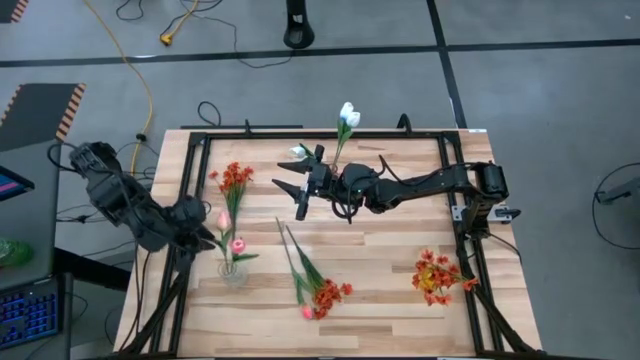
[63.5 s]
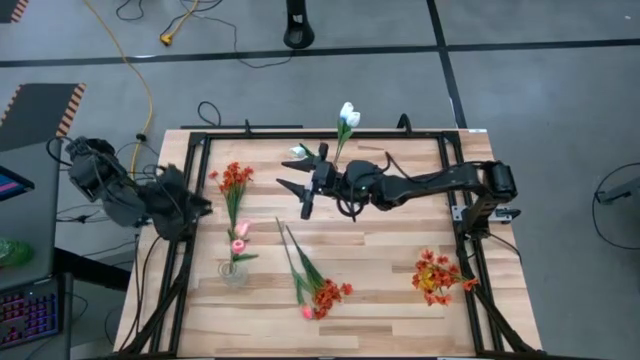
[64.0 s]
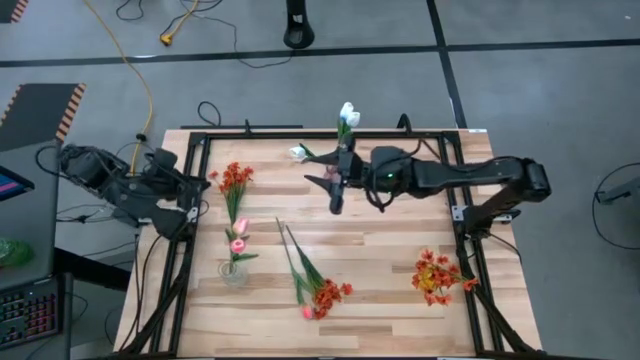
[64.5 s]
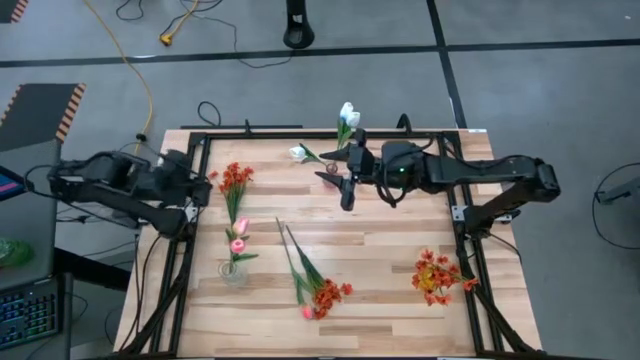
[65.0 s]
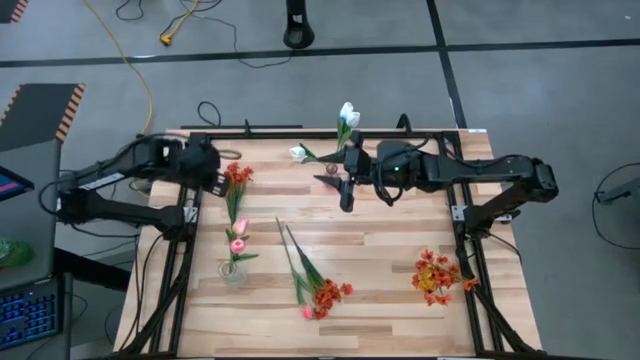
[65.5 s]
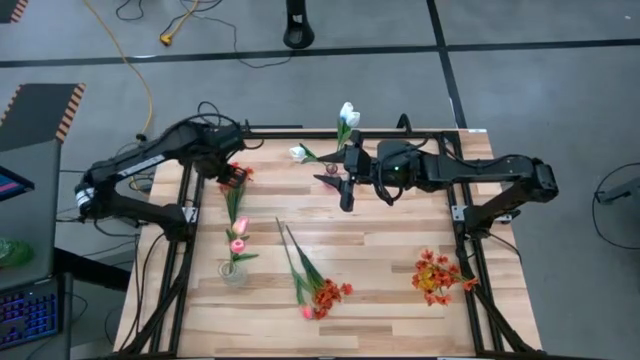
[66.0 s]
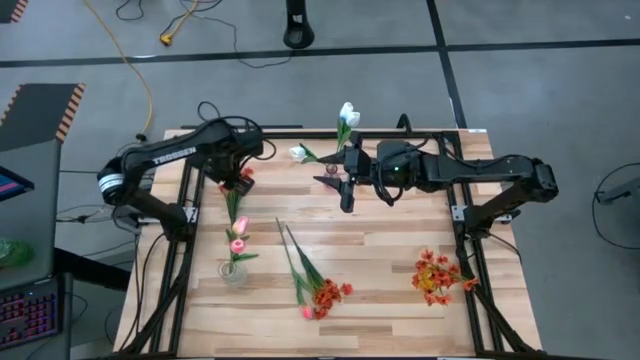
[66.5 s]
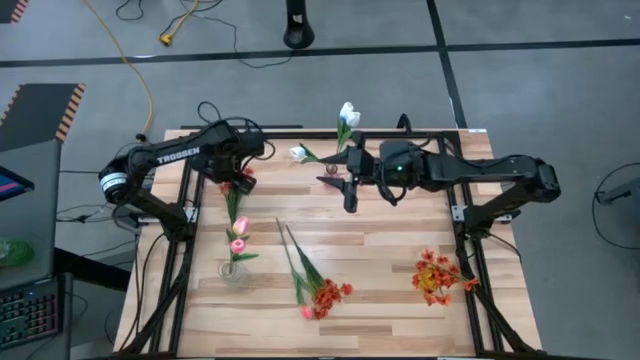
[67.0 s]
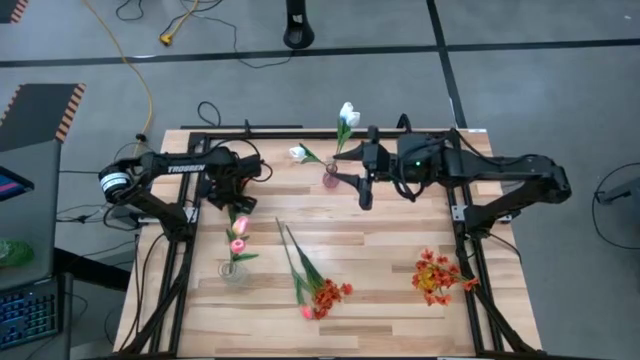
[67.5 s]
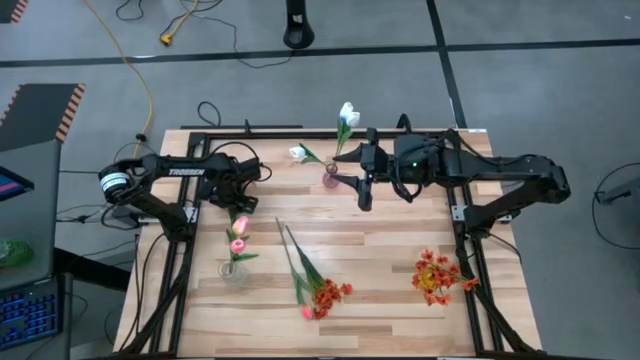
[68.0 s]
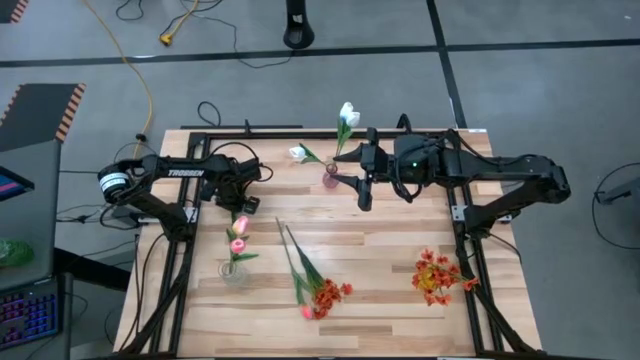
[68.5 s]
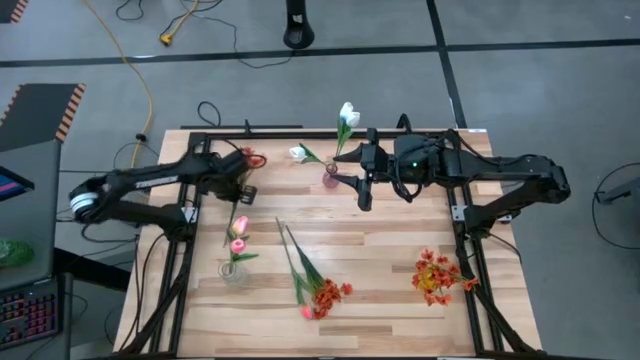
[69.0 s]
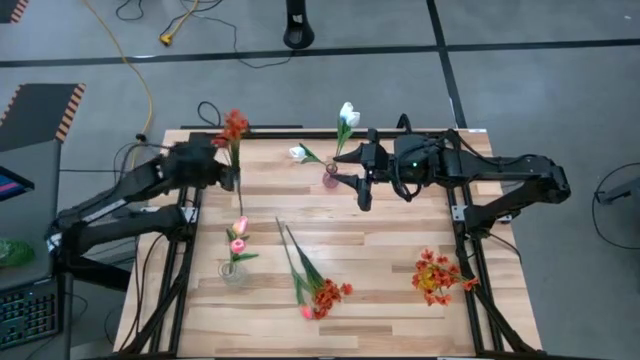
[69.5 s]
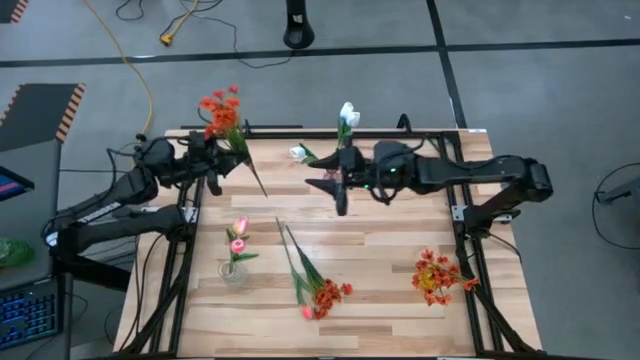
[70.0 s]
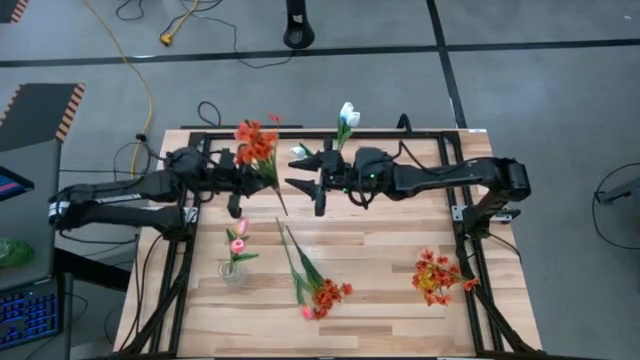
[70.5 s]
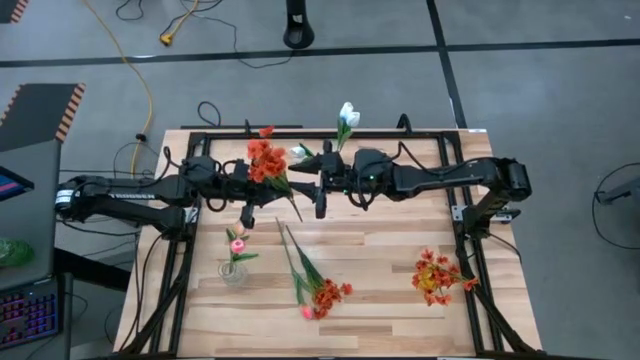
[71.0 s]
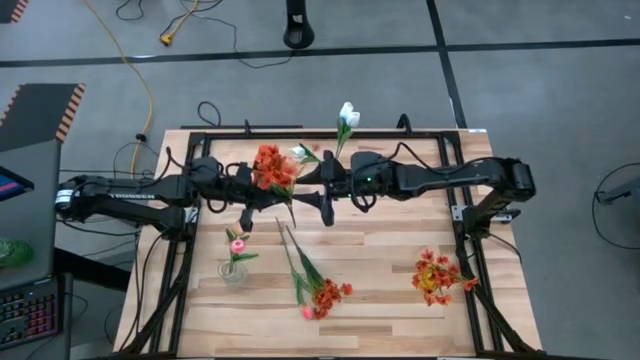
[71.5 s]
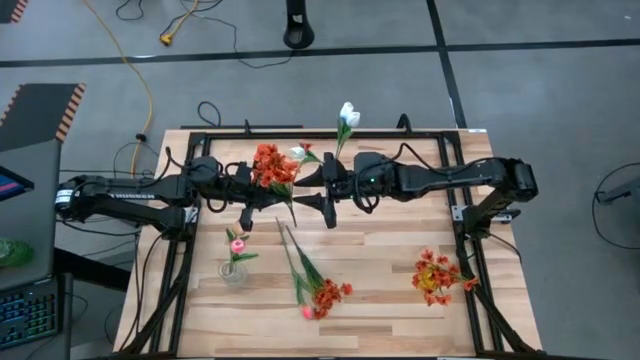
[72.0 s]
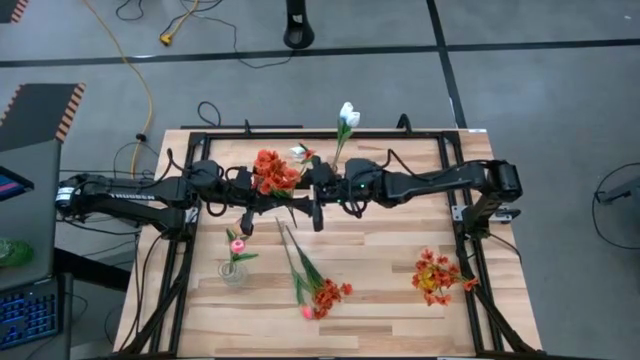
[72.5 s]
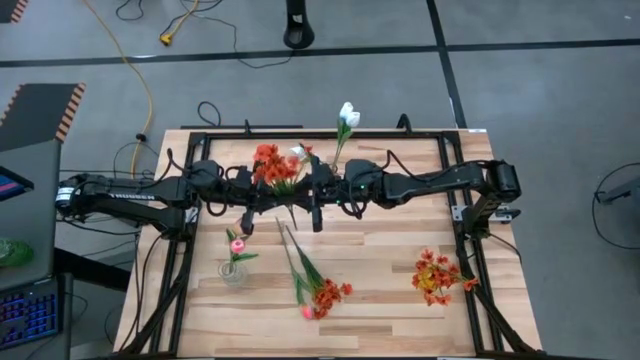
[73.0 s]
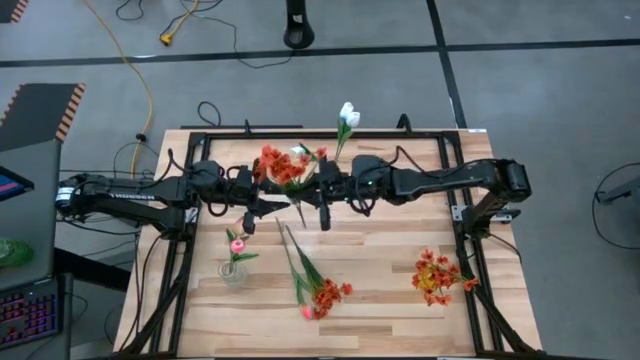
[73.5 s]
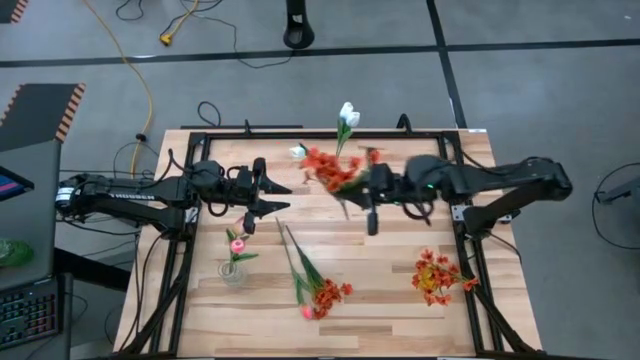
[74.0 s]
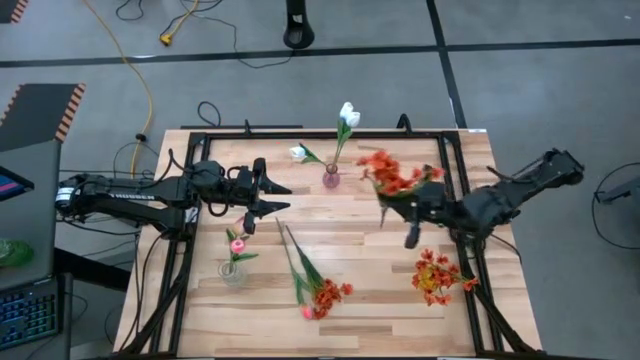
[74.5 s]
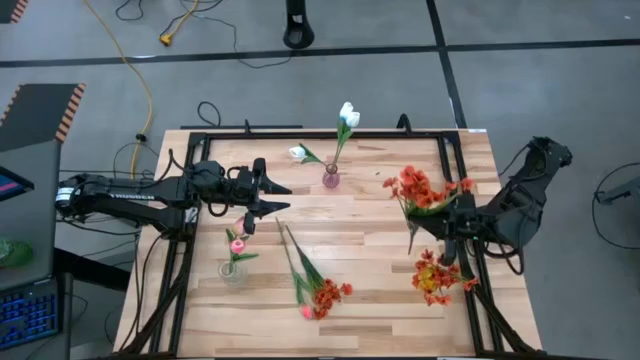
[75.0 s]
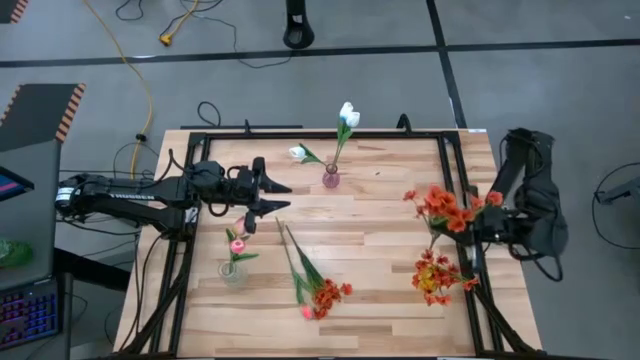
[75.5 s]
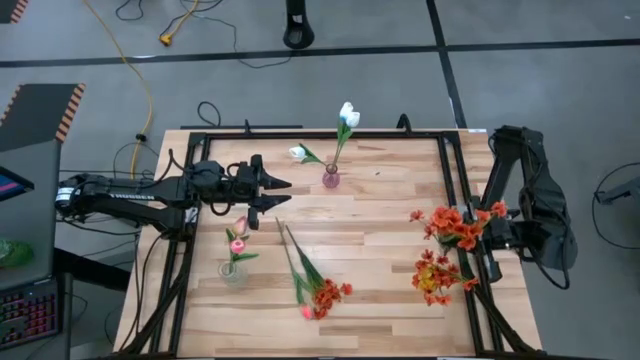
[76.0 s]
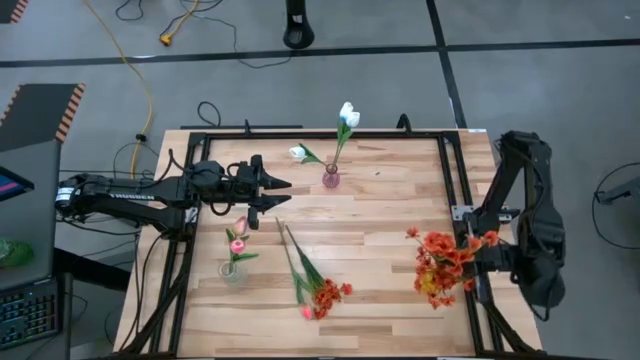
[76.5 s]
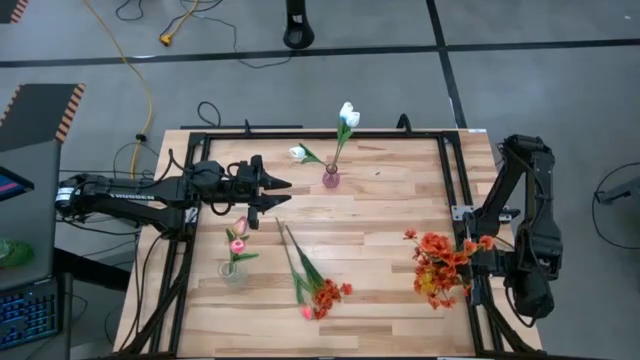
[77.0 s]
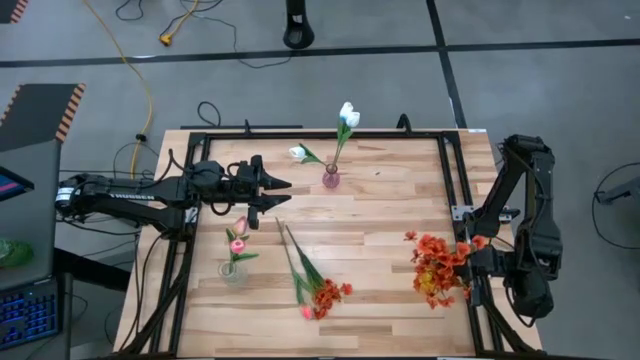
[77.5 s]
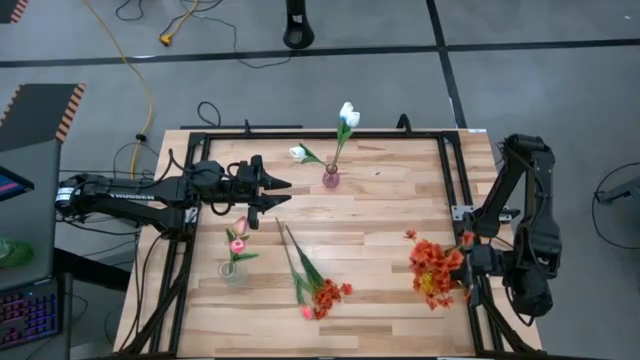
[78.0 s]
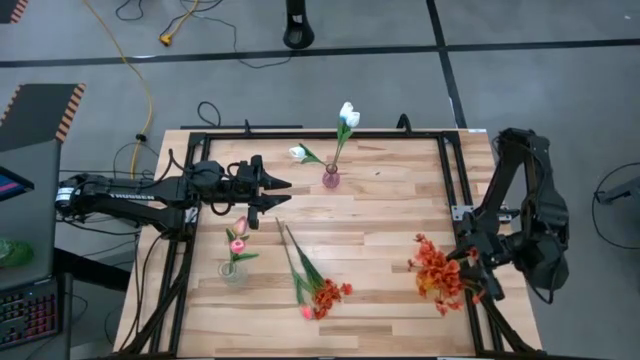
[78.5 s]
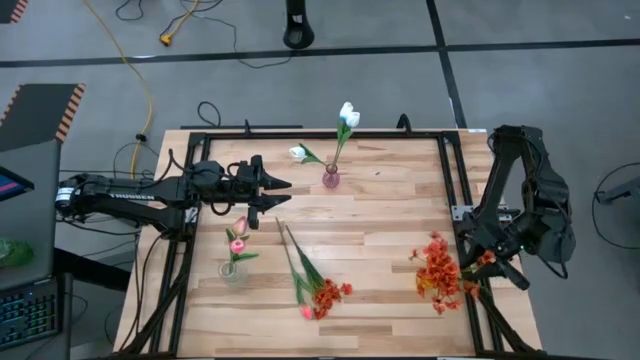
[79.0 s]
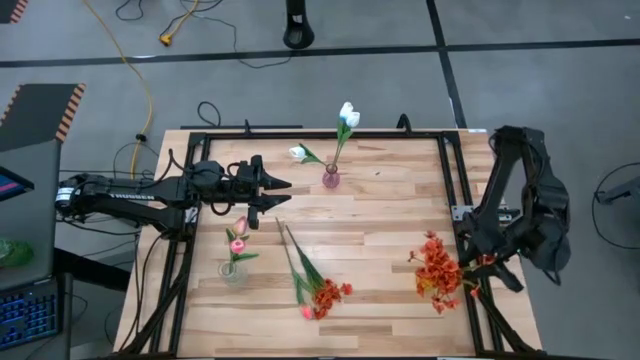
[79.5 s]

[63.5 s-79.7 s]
Task: Sort flowers into vase by color
Put left orange flower bouquet into the yellow vase

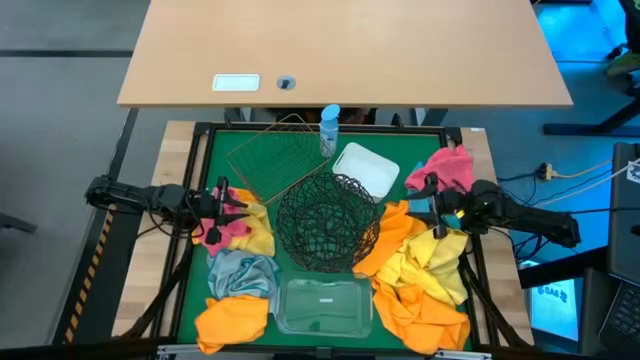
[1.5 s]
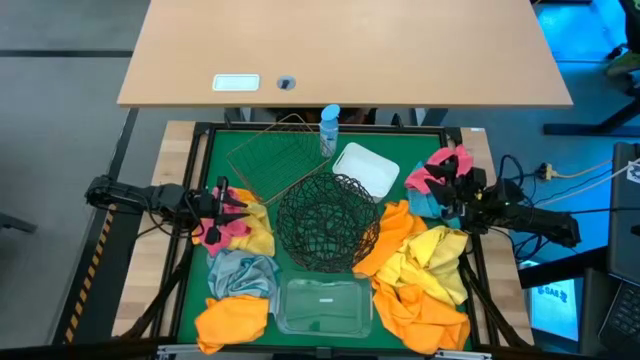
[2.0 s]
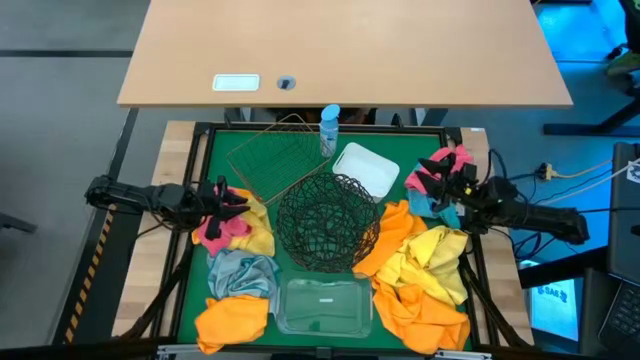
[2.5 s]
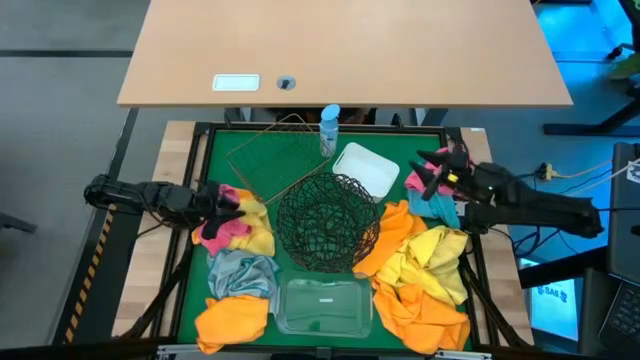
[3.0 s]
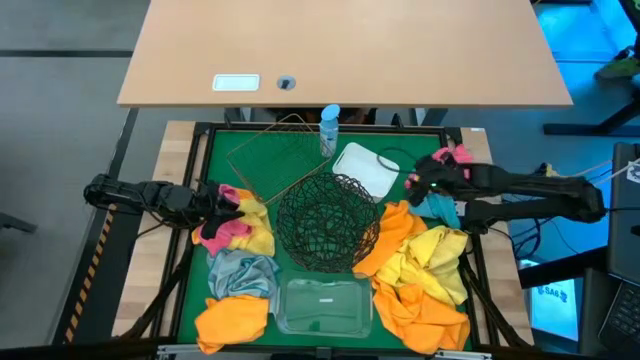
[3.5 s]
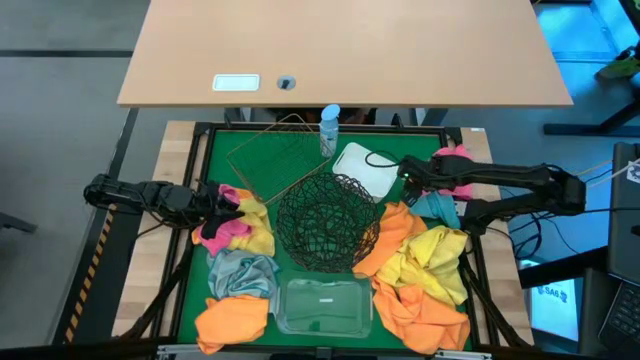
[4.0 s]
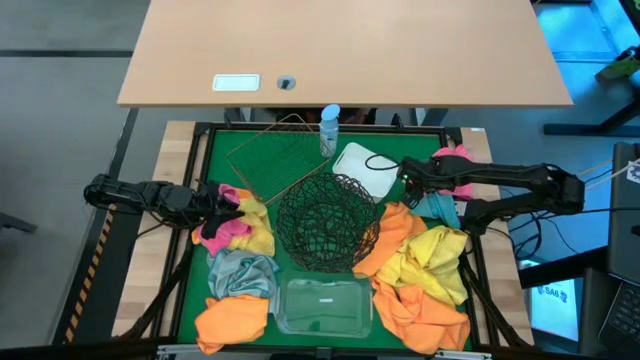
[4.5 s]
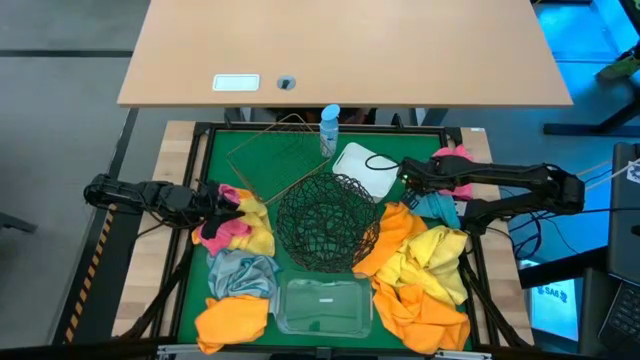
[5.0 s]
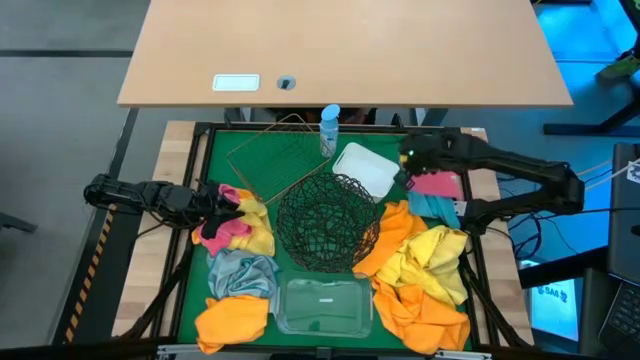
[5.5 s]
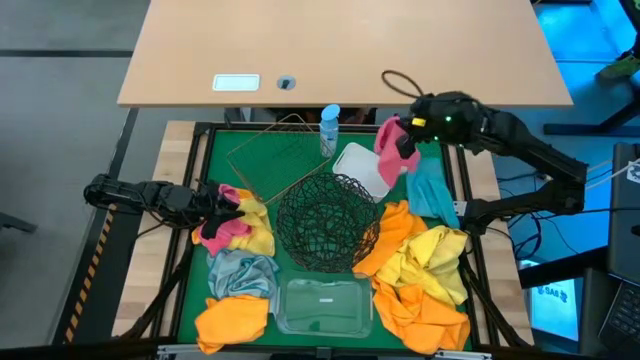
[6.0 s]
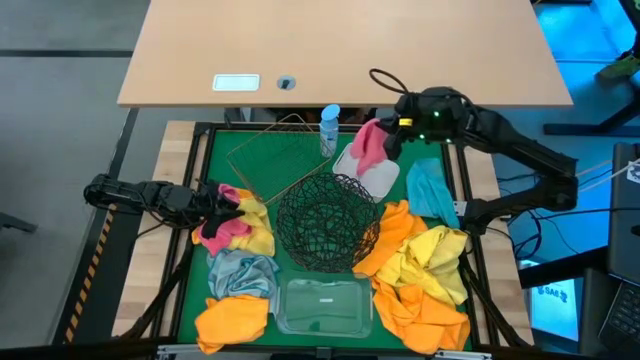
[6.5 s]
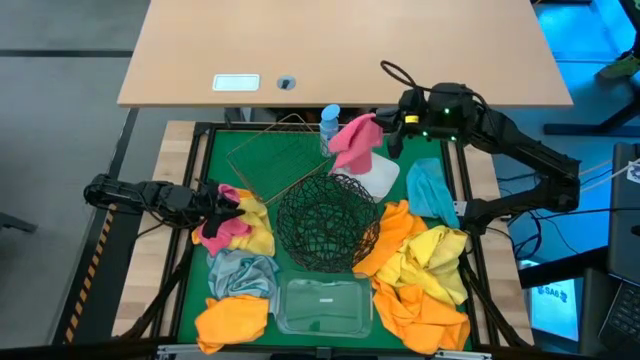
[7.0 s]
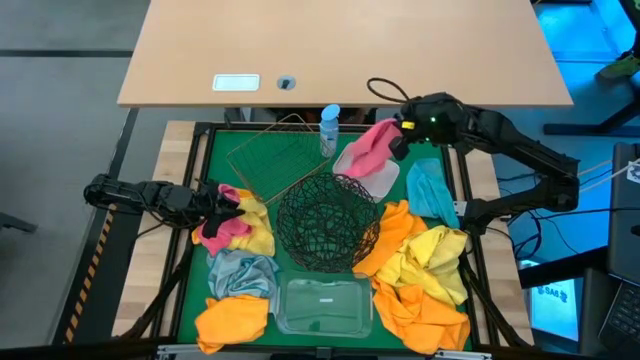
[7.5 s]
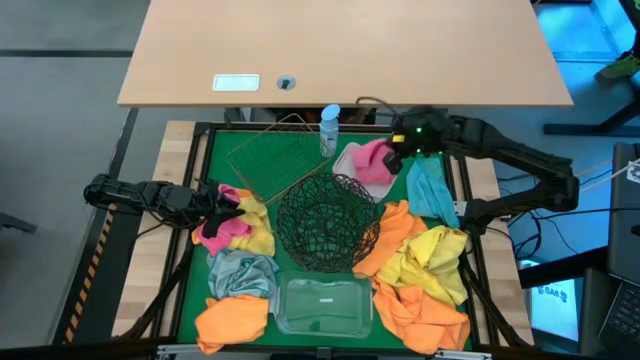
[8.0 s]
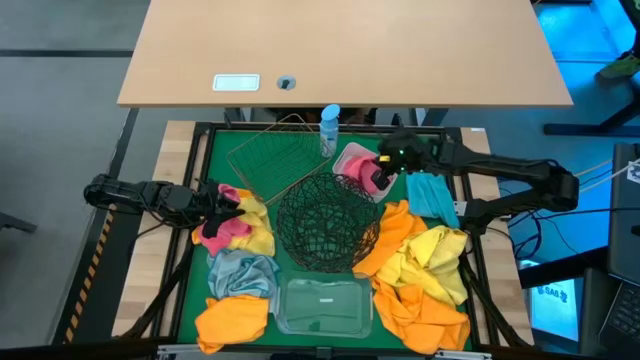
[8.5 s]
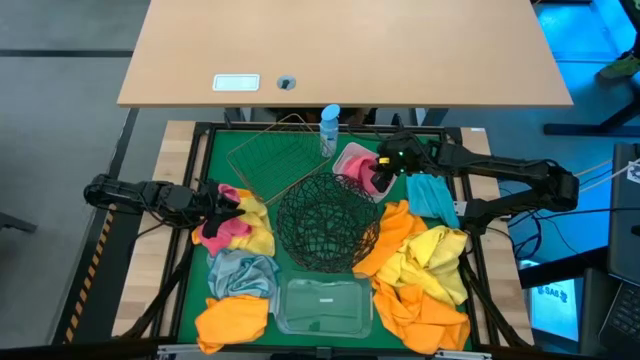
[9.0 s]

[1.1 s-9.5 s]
Task: Sort microfiber towel by color & place in baskets
Put the pink microfiber towel into the white bin
